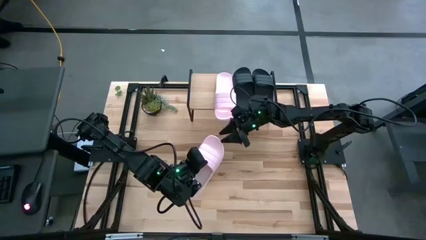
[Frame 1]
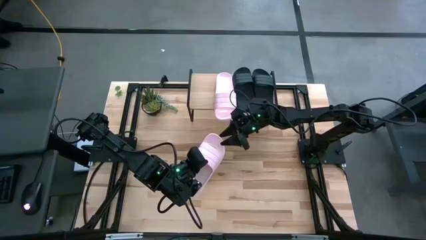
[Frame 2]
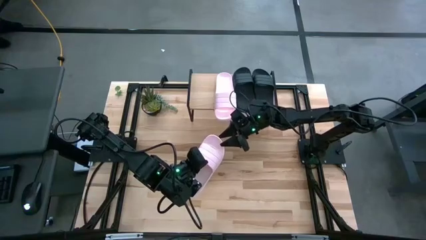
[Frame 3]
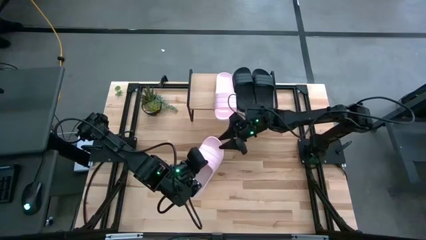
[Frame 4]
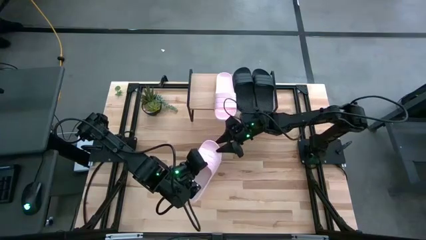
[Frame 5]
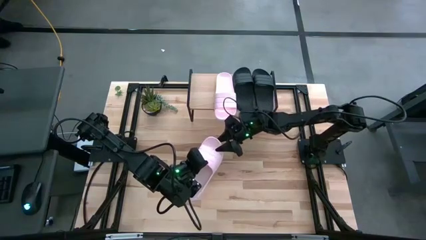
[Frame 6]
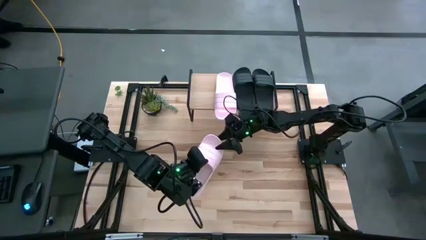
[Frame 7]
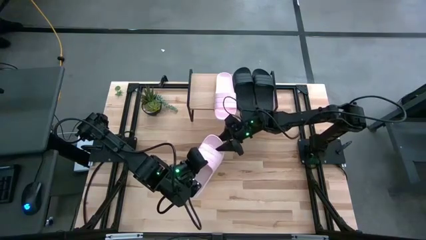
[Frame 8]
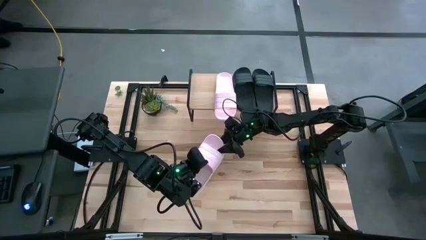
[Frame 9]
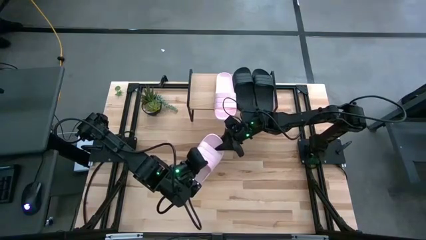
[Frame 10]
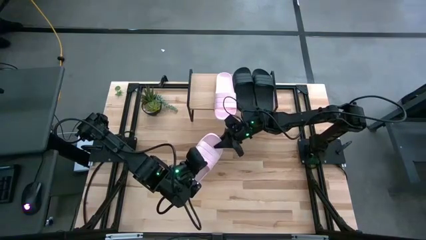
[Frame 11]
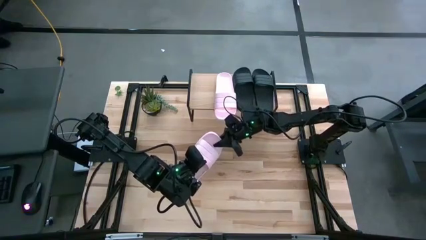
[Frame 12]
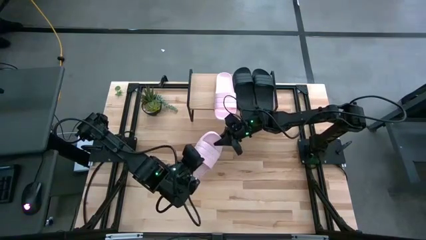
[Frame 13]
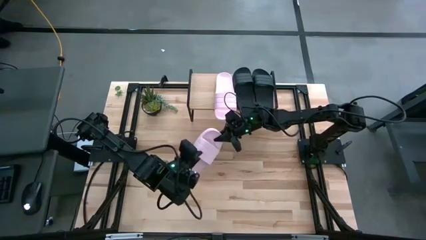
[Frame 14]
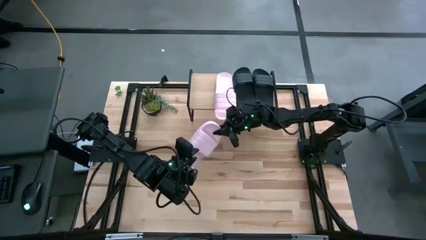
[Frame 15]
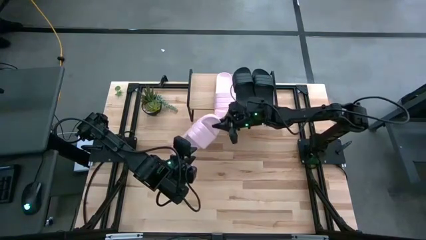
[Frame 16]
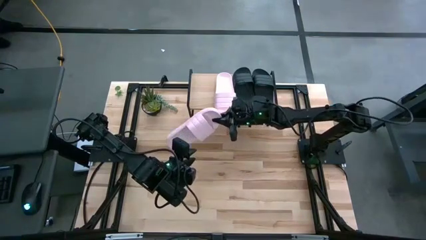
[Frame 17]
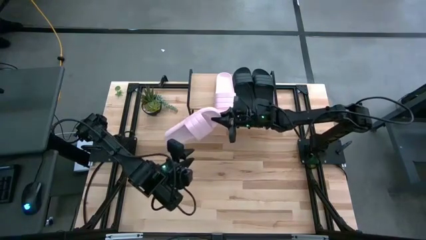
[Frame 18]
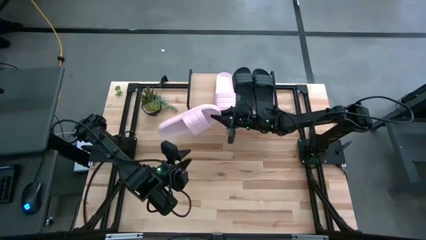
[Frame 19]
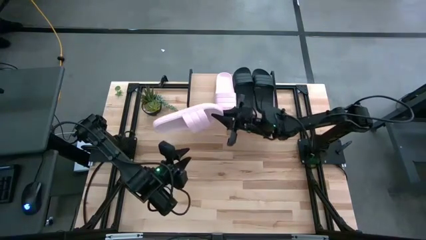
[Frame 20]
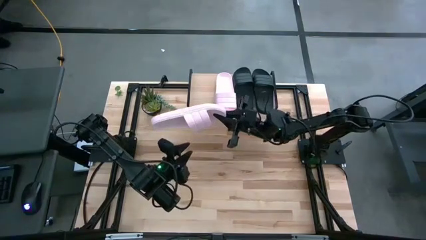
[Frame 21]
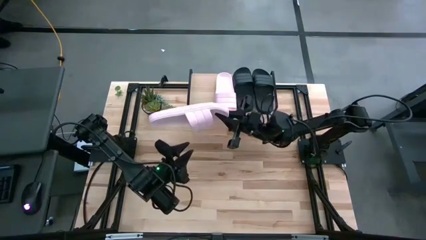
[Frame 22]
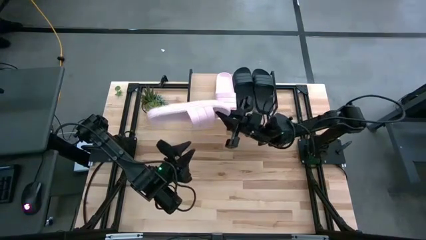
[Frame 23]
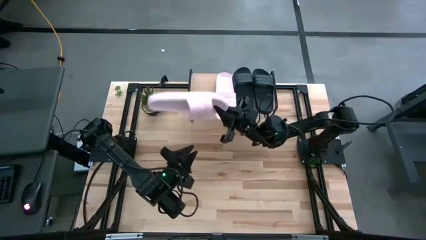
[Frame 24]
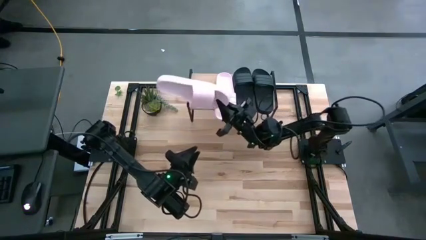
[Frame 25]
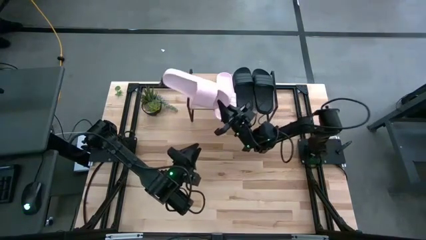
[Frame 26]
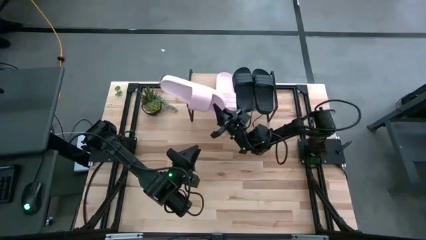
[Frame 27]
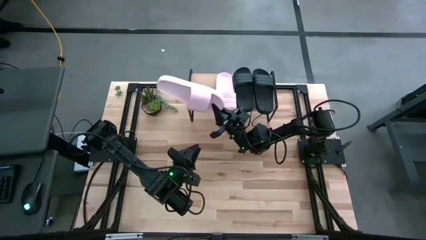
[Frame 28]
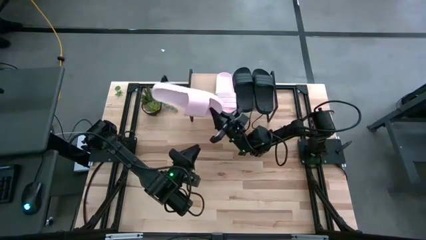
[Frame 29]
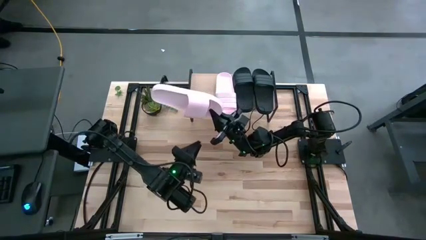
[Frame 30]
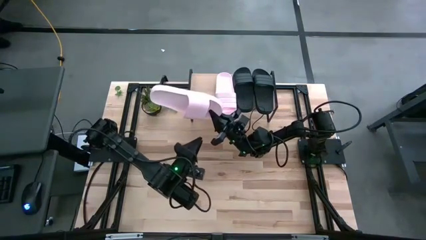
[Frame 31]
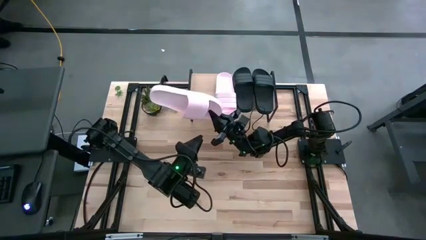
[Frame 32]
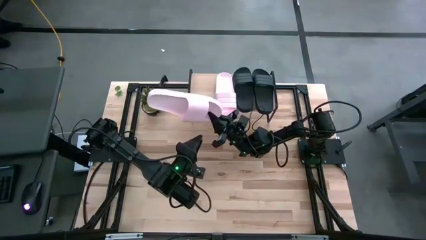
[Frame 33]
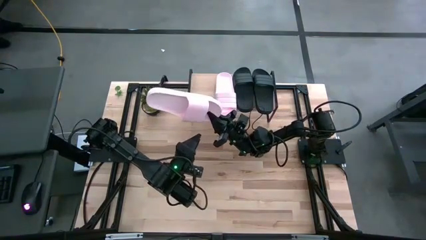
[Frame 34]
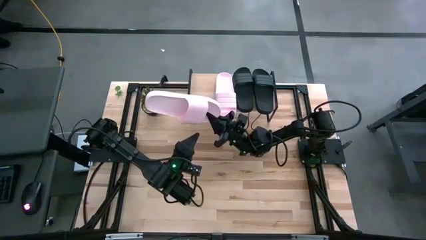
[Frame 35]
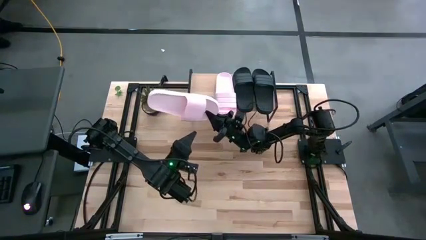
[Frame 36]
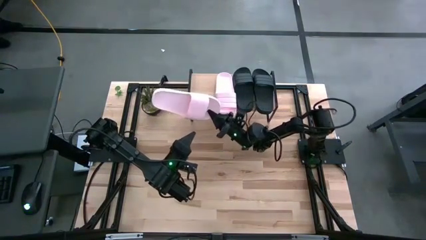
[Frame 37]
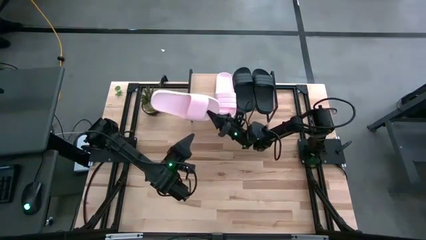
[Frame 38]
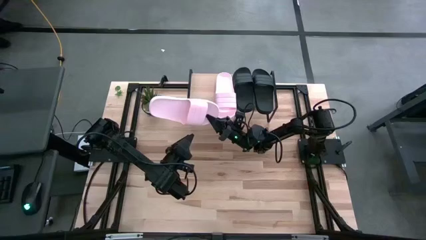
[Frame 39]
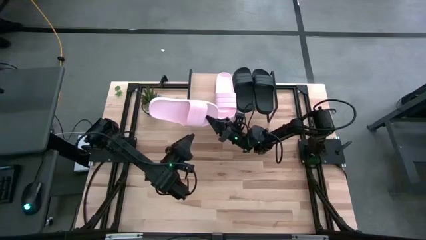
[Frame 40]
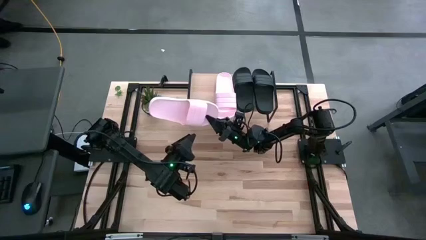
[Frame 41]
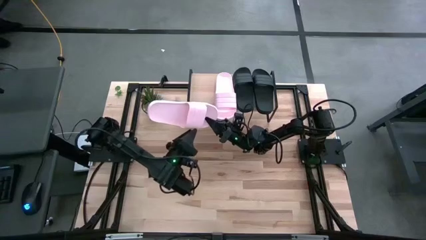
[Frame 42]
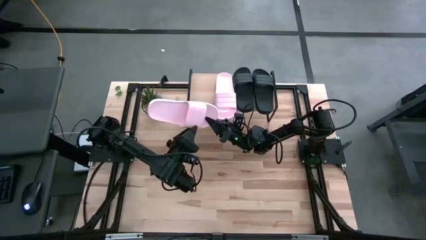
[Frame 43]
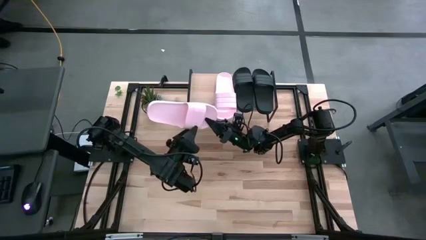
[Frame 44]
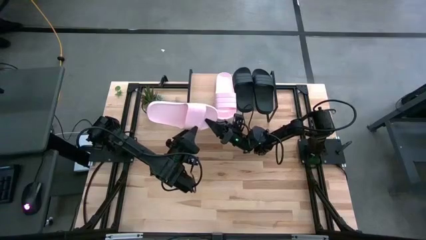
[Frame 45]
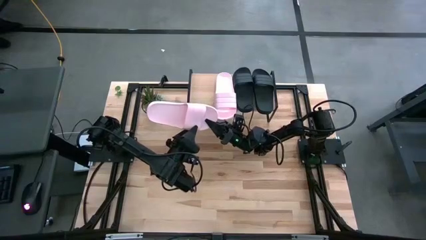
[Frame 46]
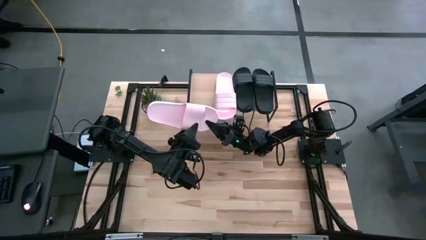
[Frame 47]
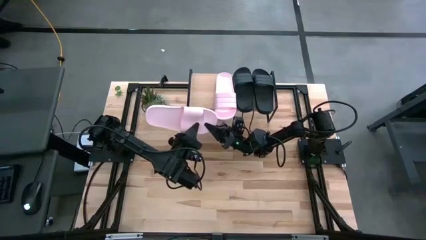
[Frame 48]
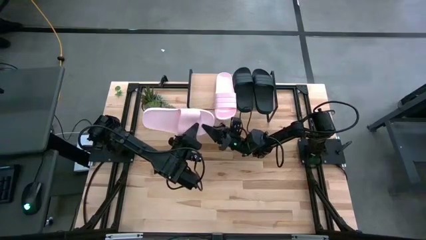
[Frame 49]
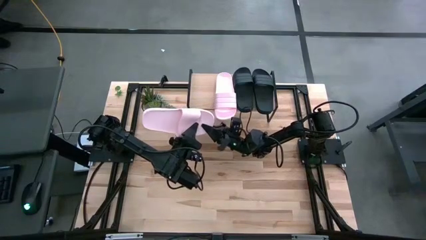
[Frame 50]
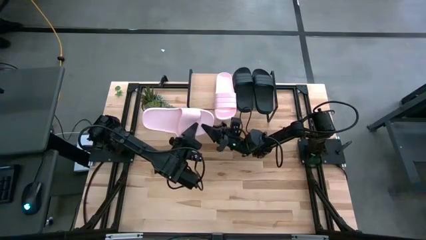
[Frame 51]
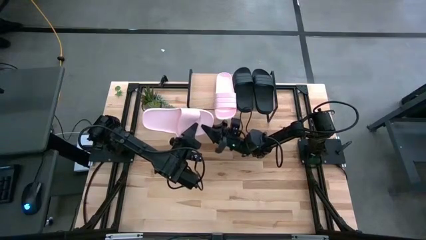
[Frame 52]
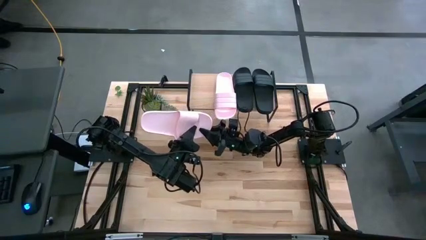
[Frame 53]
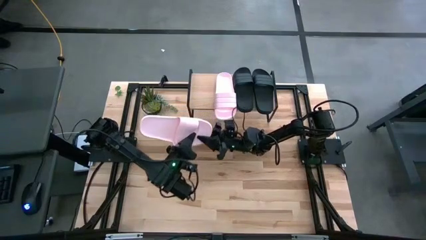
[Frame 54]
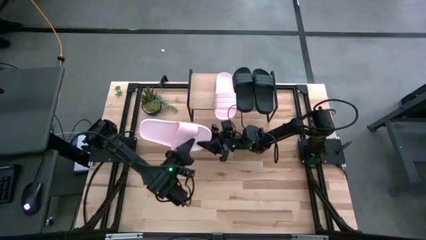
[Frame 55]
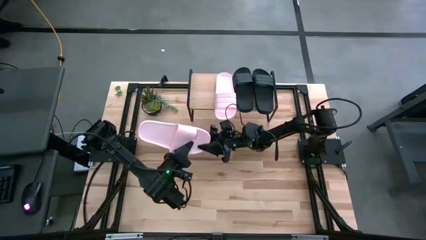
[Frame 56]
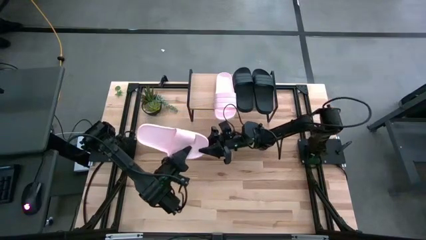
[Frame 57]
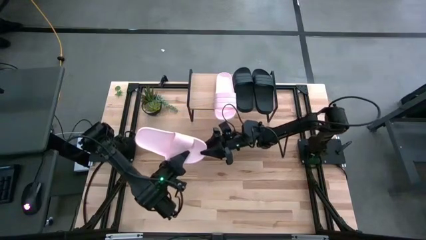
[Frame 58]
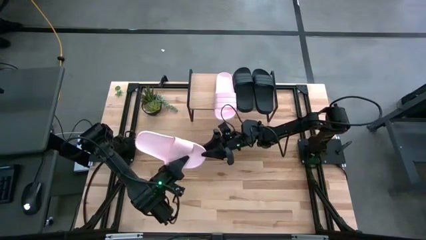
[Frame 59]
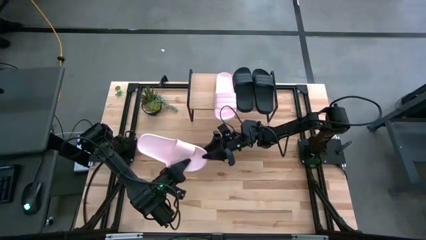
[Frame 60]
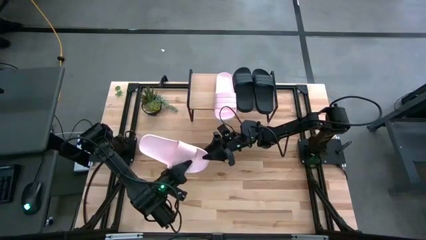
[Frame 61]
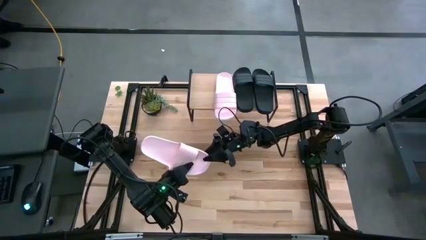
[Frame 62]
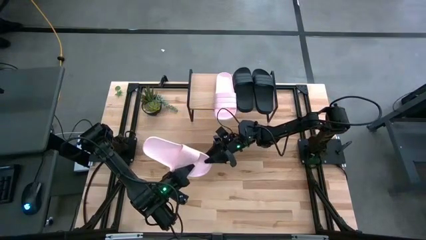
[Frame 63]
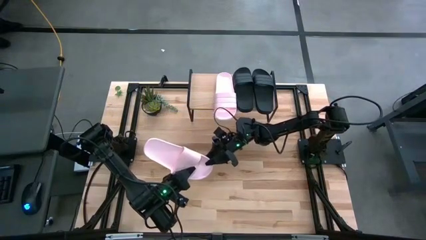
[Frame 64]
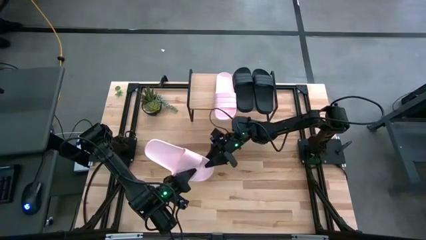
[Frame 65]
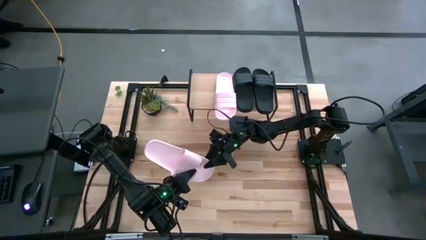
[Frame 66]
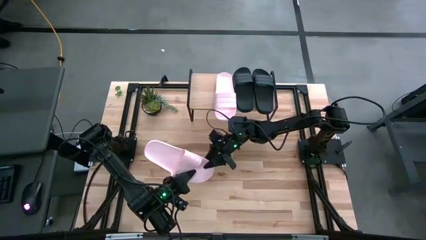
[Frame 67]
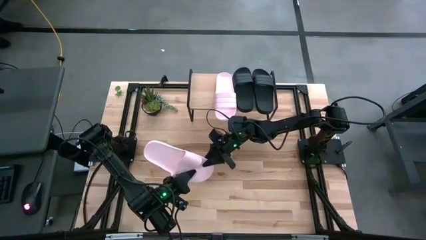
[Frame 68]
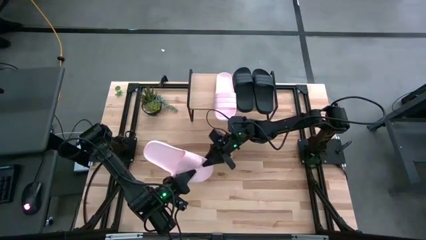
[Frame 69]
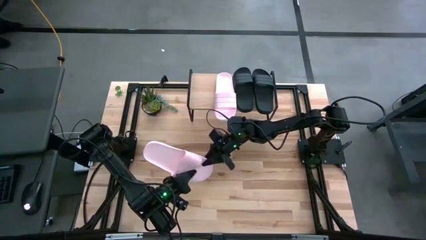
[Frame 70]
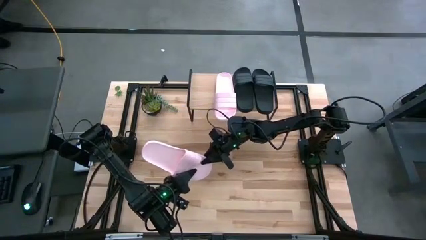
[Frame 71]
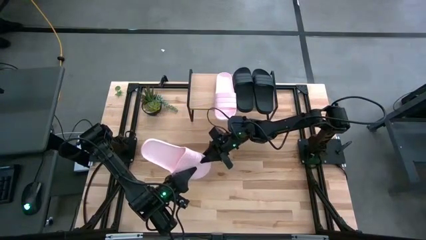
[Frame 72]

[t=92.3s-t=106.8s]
Task: Pick and place slides into the shelf
Put the pink slipper on the shelf

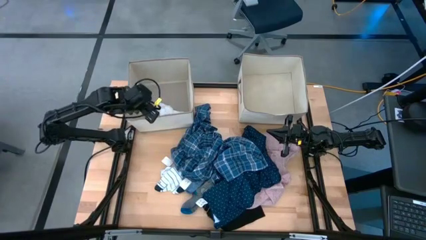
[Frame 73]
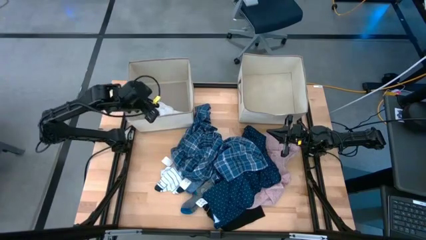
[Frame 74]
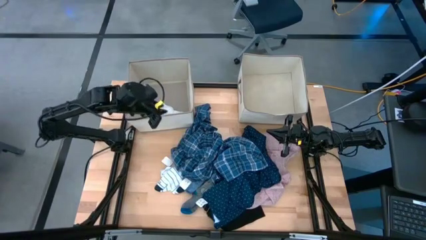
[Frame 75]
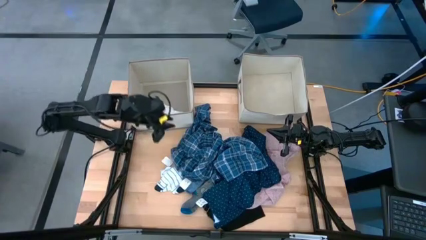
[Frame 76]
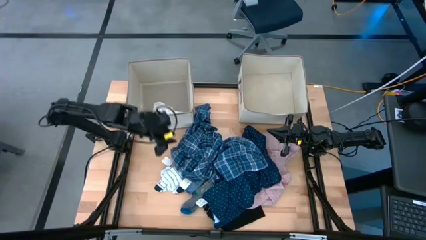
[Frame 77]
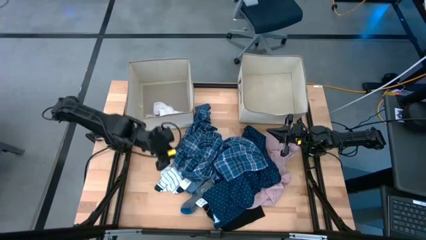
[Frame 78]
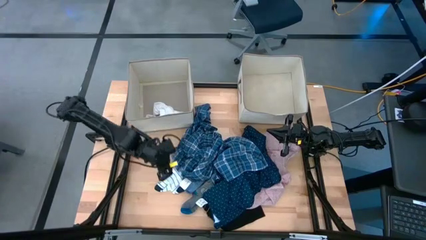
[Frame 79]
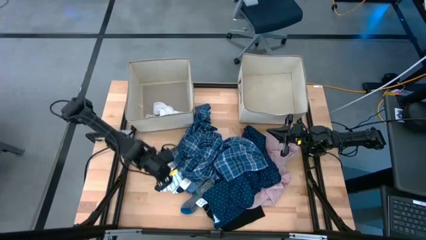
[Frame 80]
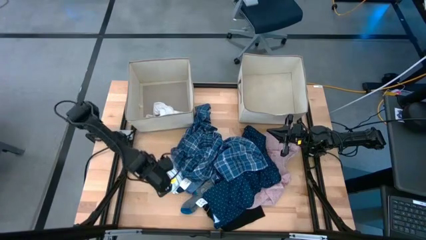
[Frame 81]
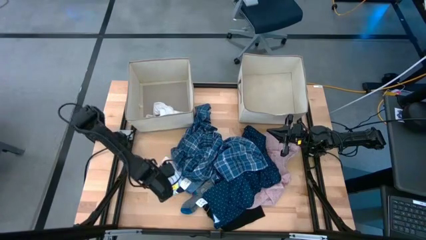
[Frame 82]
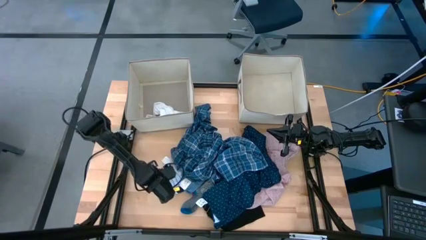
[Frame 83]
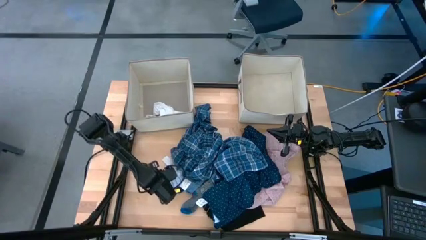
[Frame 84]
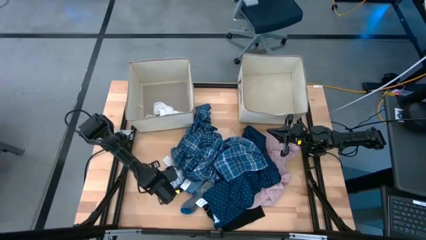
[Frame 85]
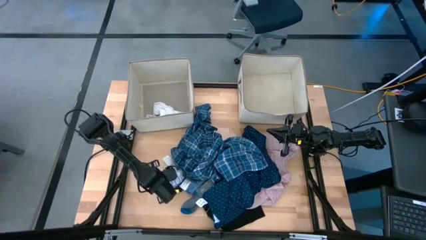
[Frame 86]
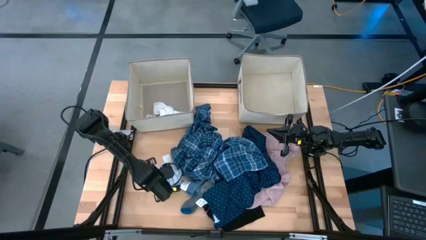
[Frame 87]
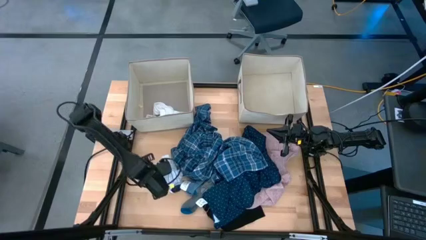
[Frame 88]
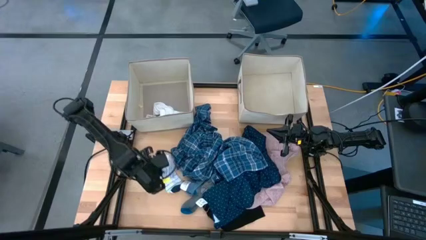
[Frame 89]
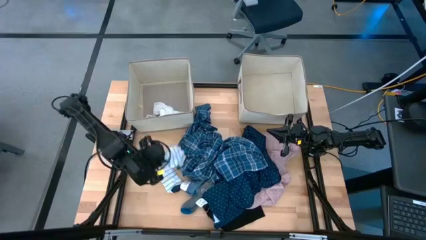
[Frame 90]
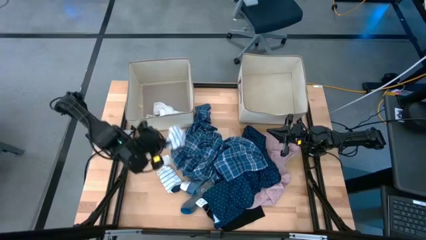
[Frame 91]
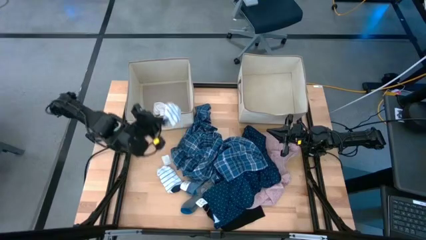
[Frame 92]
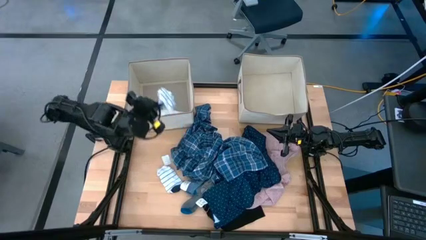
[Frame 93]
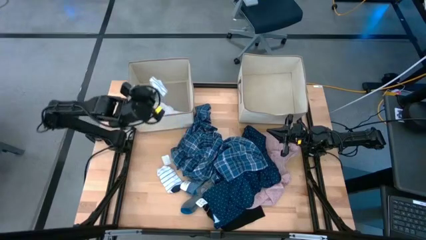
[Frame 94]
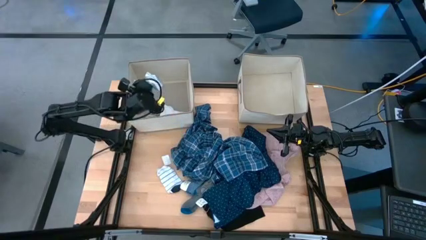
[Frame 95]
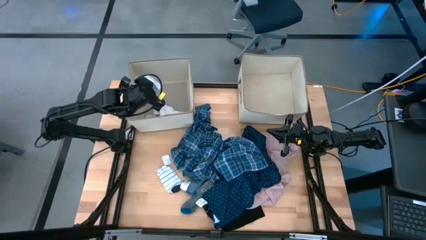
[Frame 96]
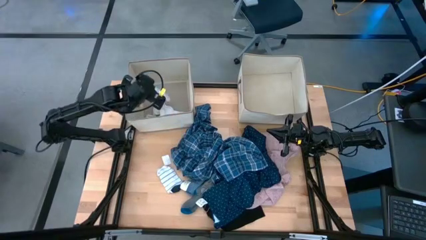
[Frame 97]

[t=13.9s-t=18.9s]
Task: Sort clothes
Put the white patterned sock into the left laundry bin
